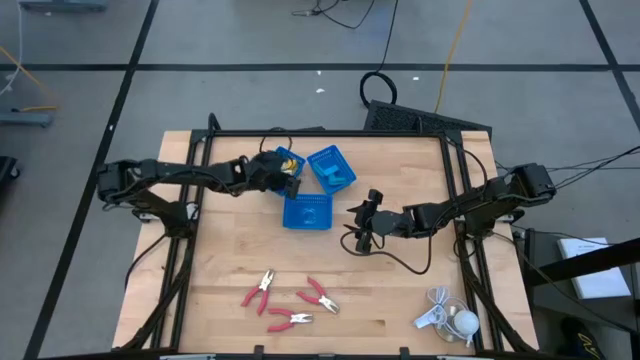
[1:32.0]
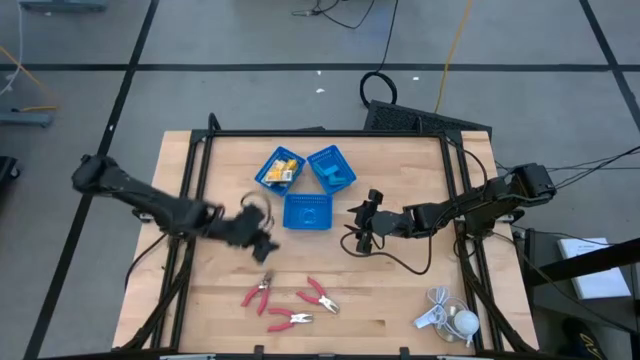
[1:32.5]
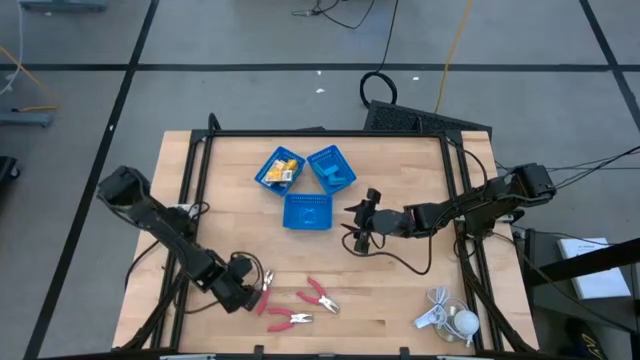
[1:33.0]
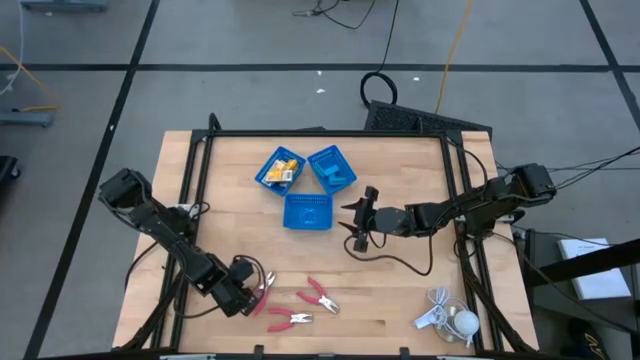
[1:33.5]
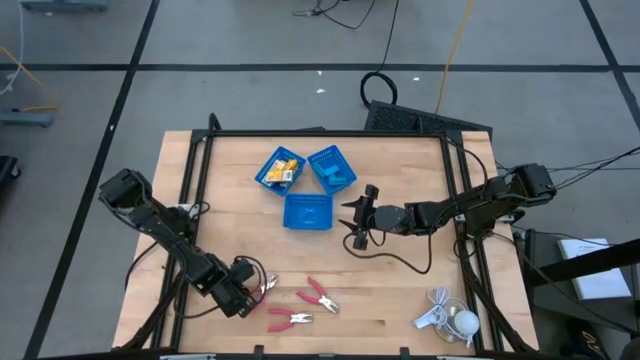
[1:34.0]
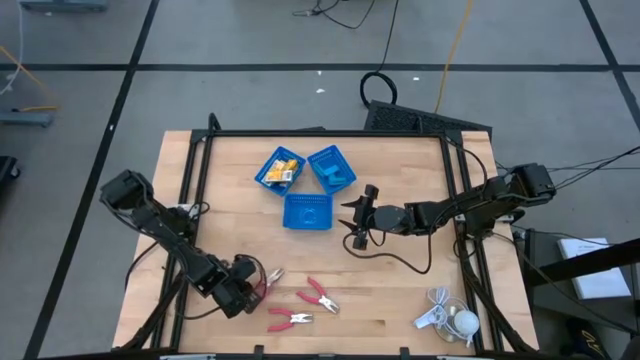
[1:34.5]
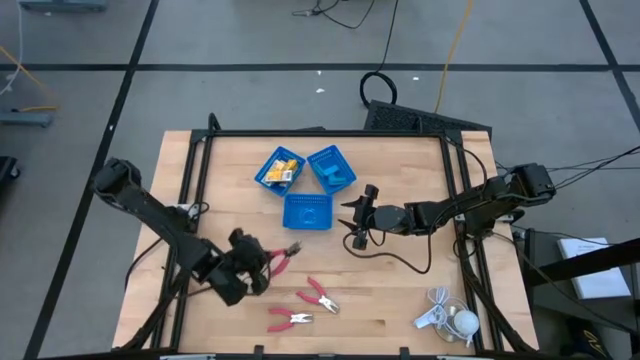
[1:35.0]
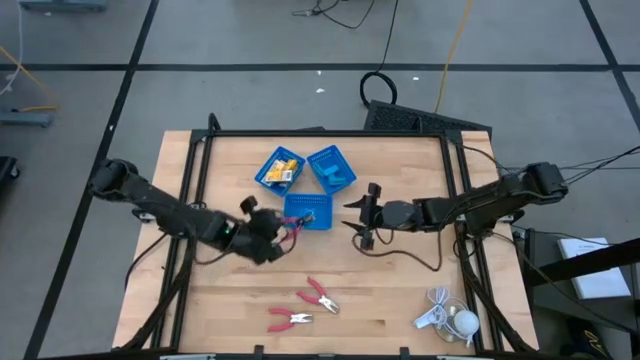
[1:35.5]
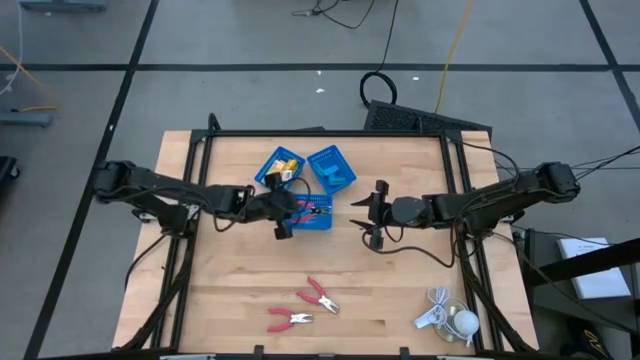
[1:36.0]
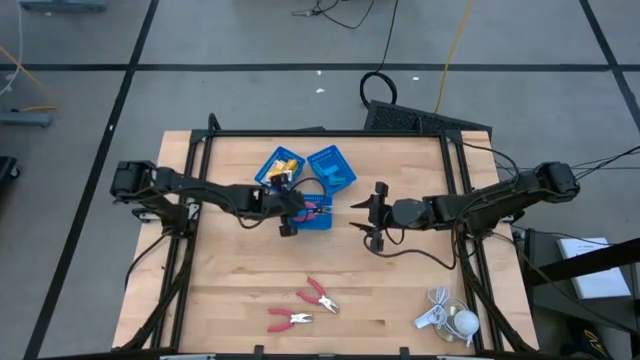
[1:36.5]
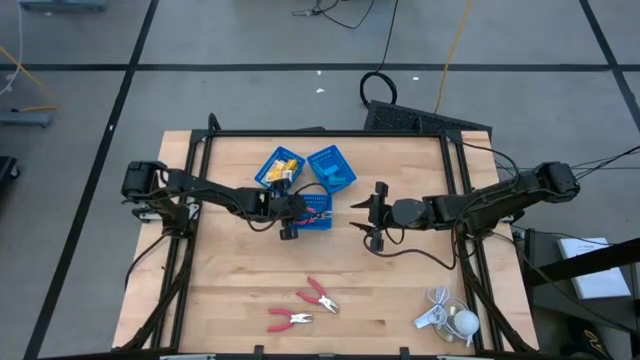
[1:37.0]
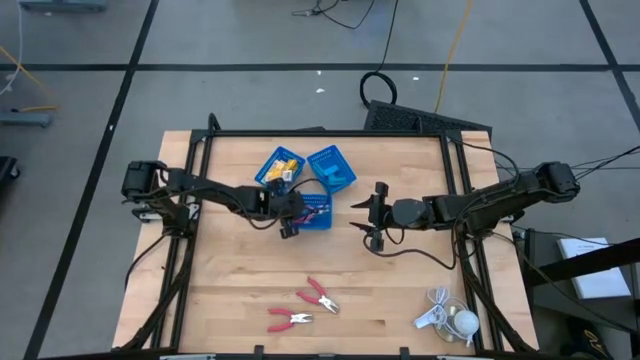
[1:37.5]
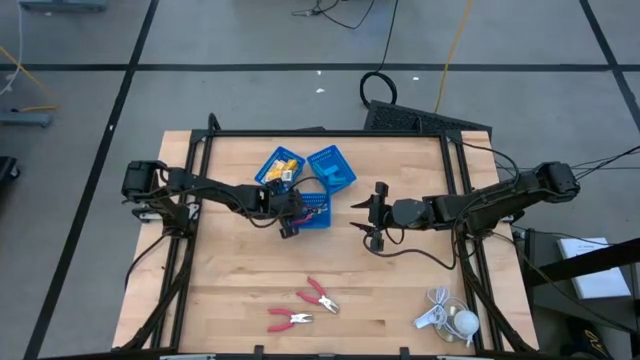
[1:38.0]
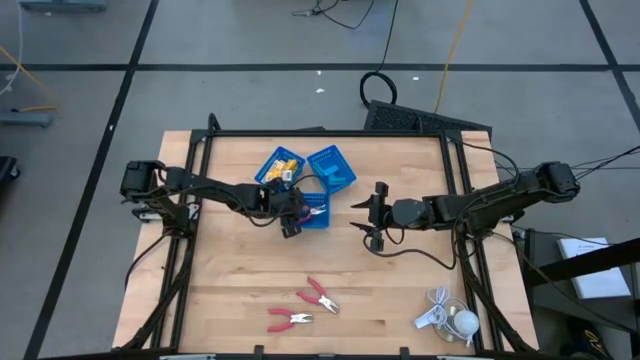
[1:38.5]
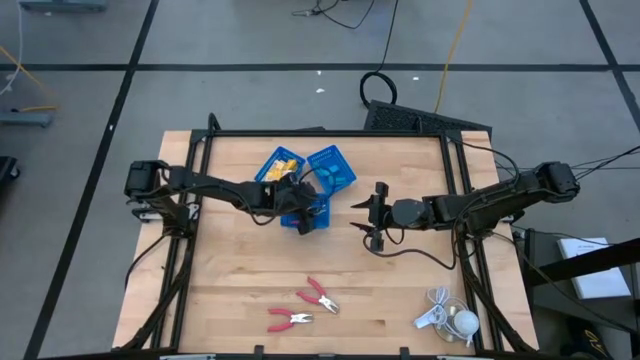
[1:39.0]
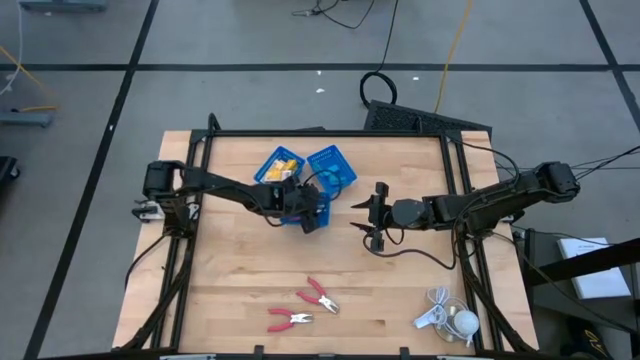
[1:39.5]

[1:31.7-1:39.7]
Task: Pick & Place School Supplies
Put the pink hole puncher into the bottom blue bin

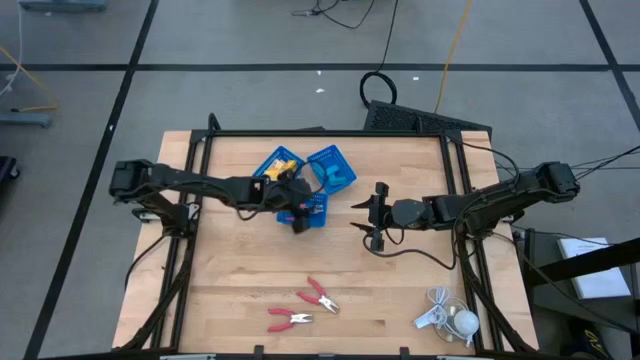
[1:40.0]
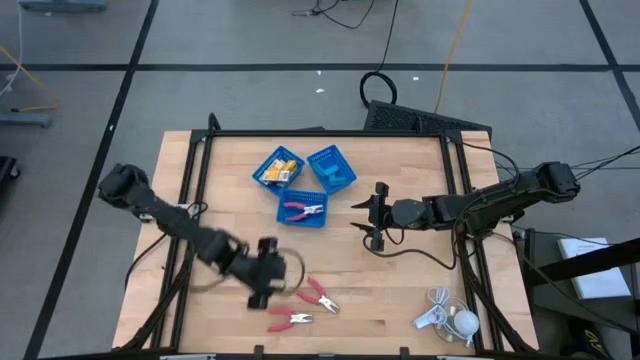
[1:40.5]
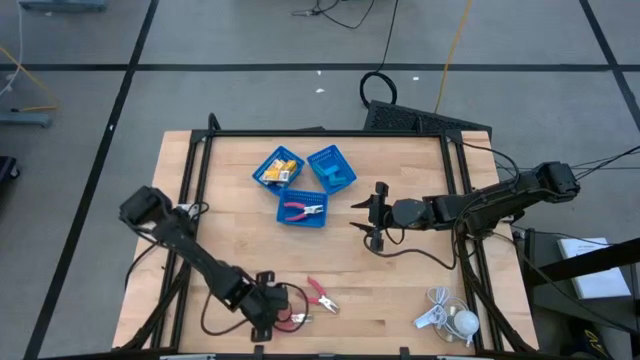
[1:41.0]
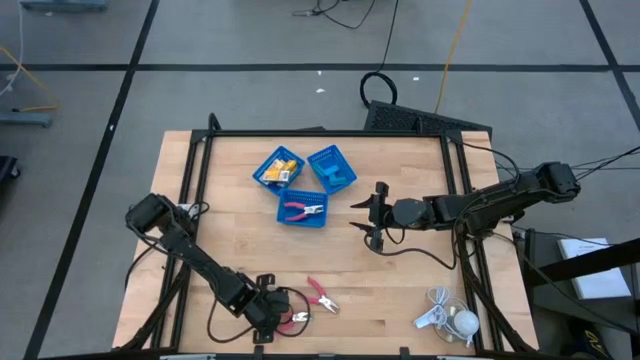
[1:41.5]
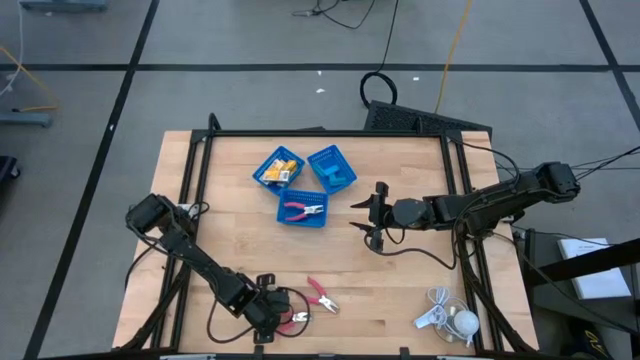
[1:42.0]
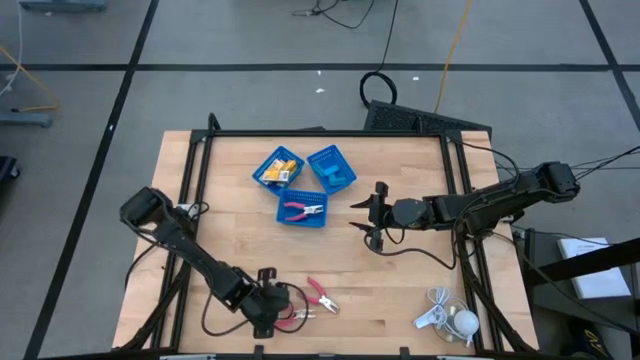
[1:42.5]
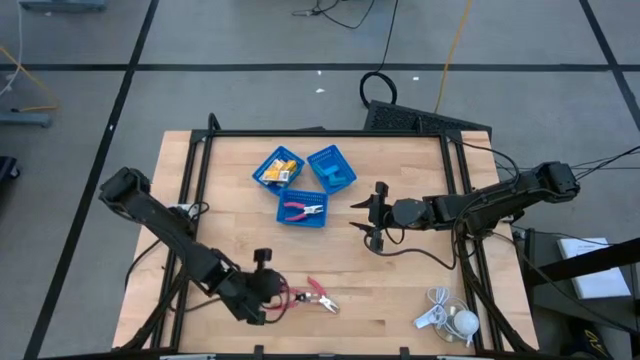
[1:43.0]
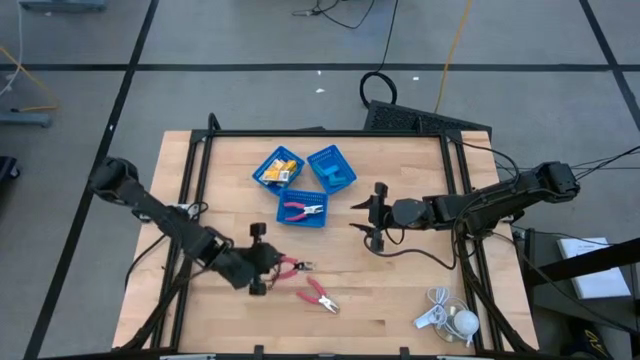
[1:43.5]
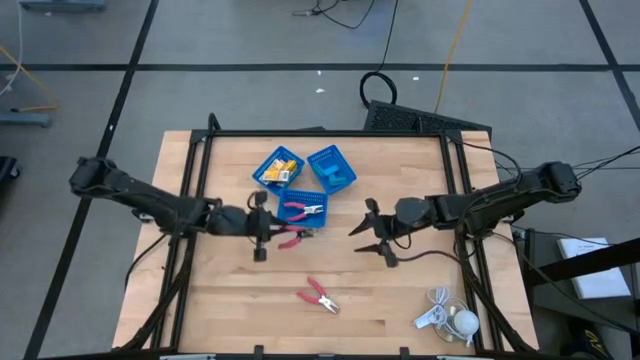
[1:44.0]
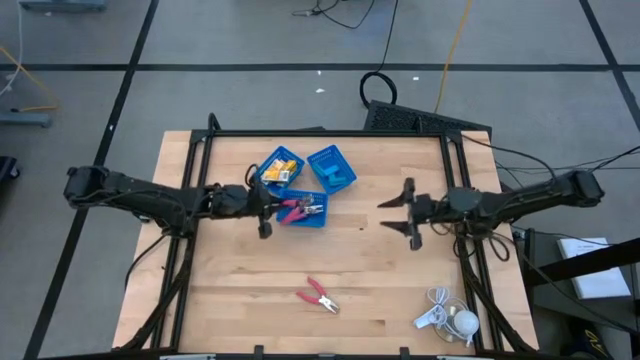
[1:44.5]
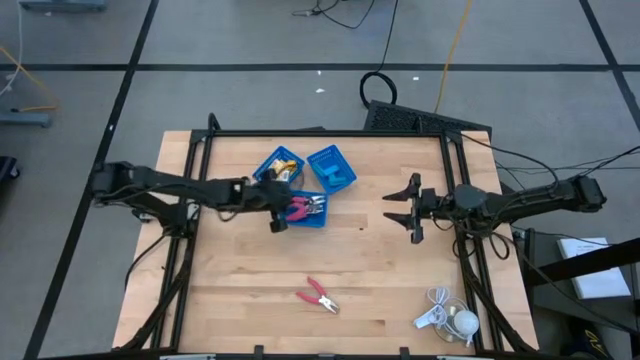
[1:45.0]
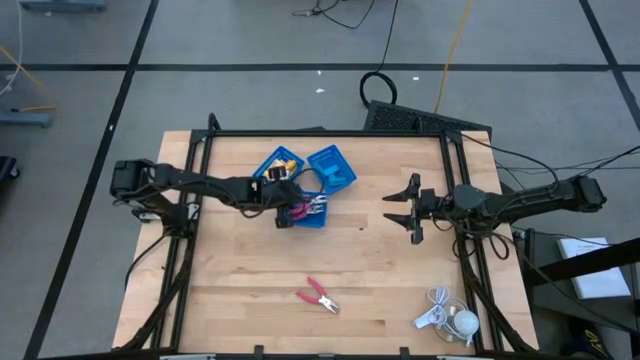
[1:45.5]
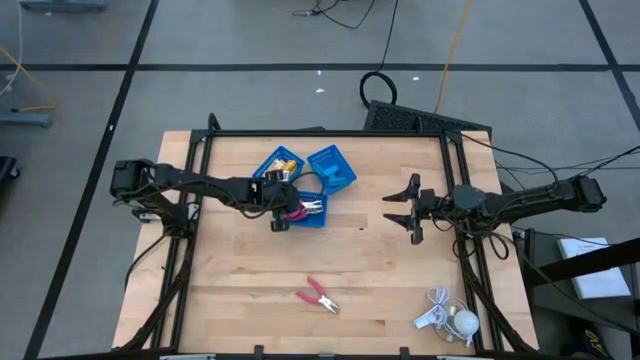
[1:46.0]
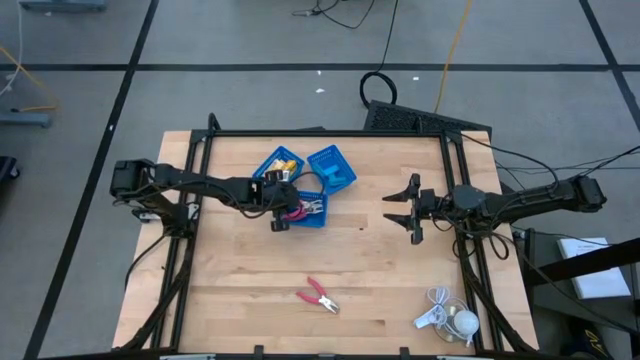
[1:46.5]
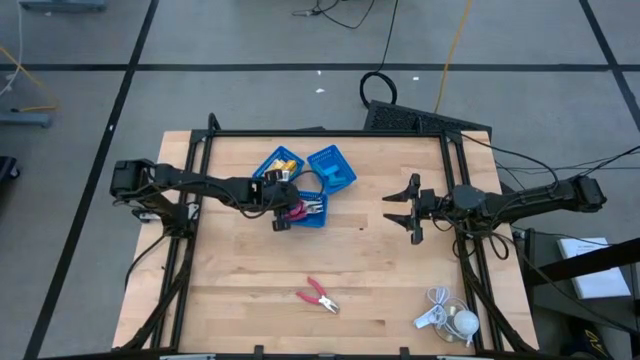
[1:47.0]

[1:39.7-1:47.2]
Put the pink hole puncher into the bottom blue bin

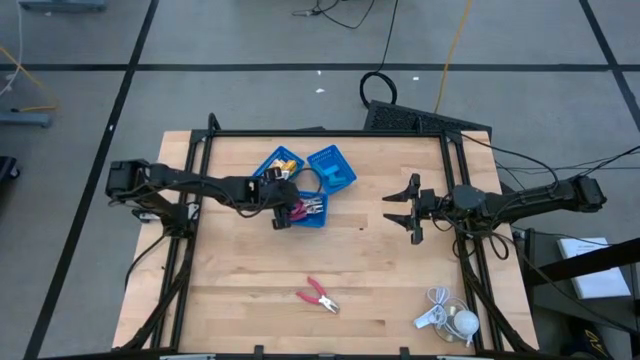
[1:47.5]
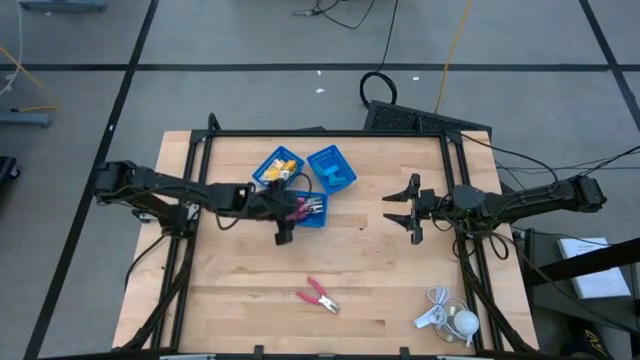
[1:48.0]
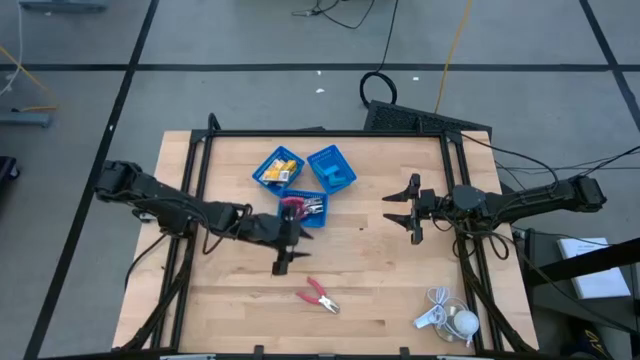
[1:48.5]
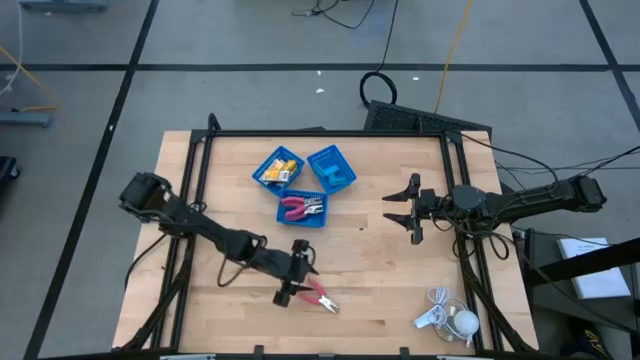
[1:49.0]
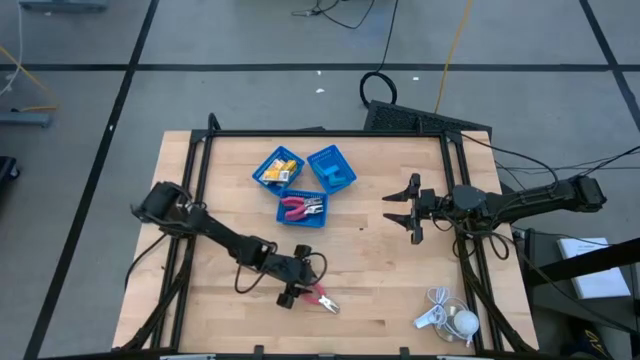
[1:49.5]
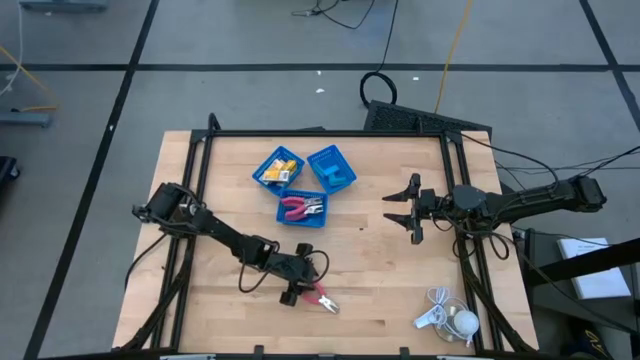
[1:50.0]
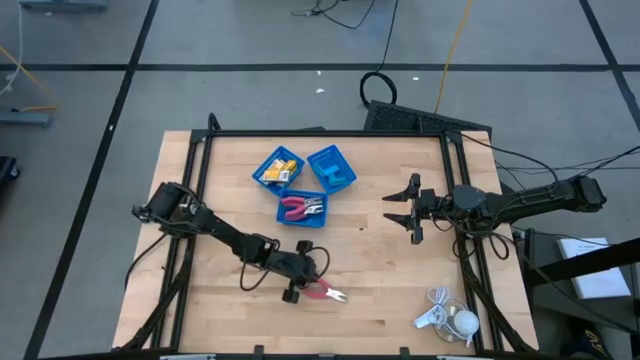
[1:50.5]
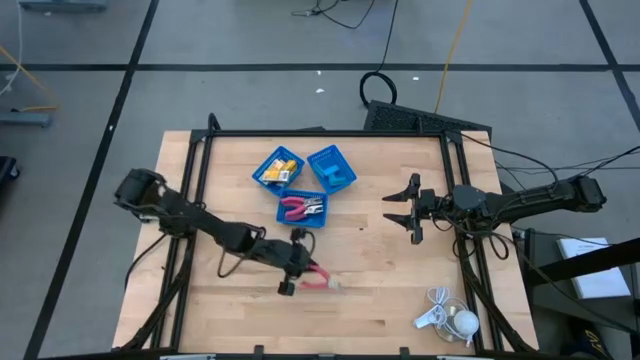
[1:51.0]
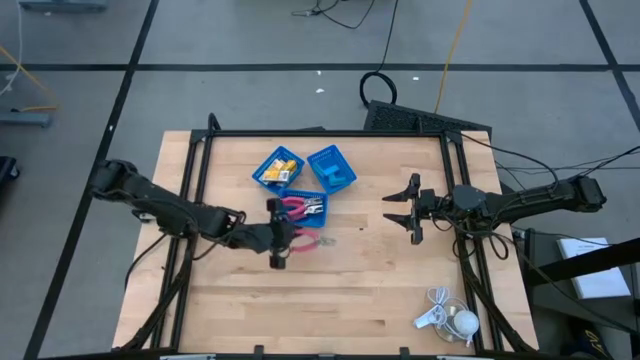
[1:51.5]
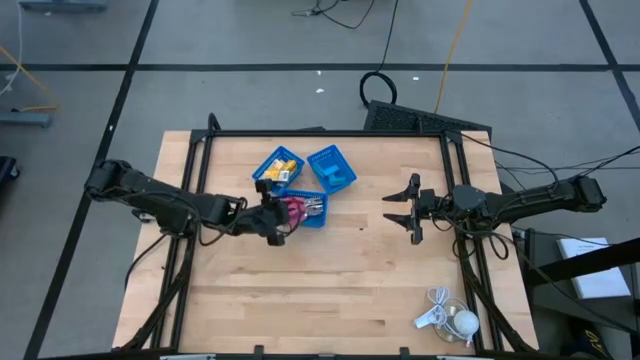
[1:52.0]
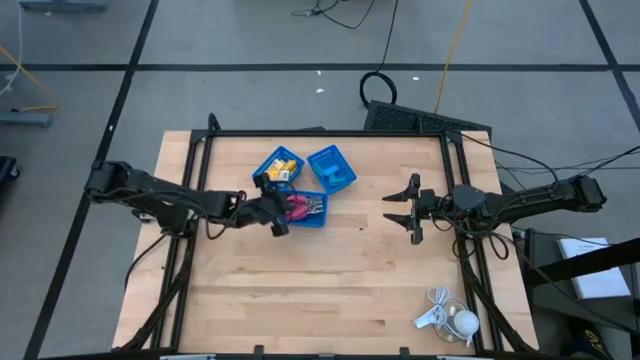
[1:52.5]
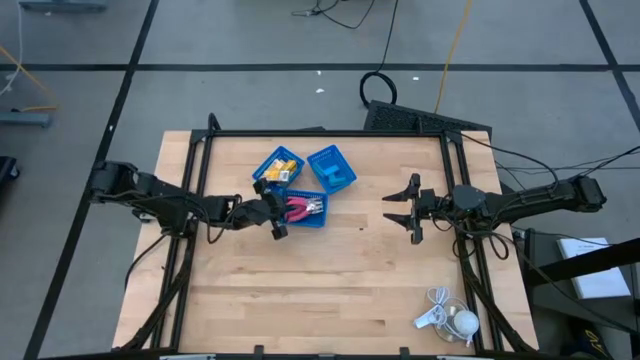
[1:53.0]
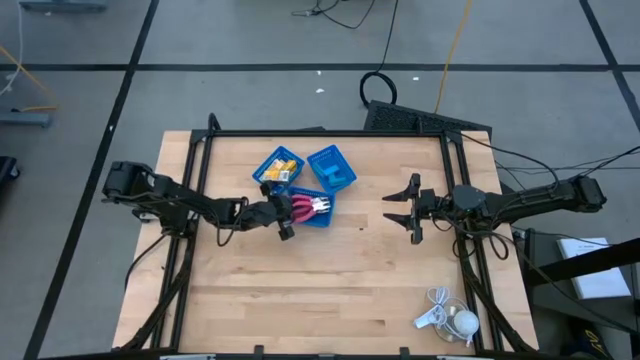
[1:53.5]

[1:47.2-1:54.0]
Put the pink hole puncher into the bottom blue bin
